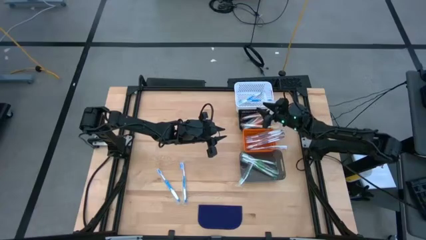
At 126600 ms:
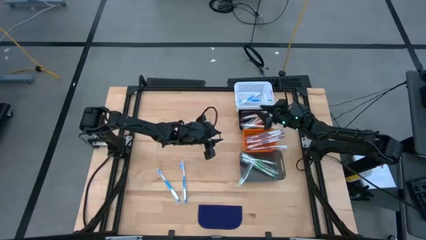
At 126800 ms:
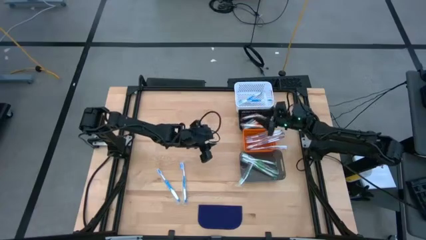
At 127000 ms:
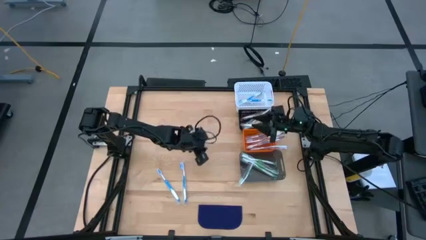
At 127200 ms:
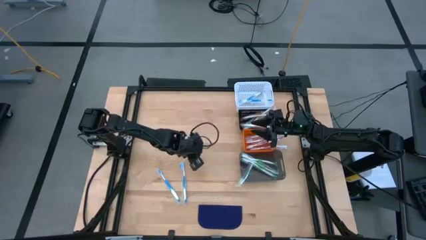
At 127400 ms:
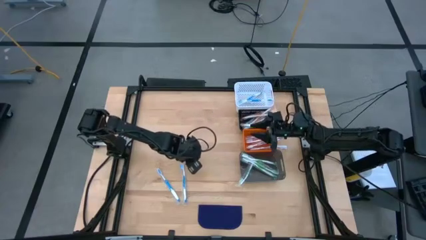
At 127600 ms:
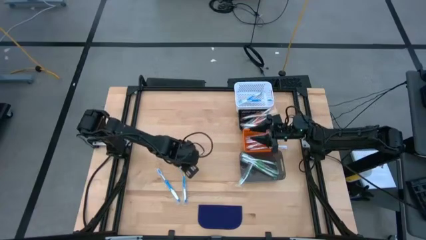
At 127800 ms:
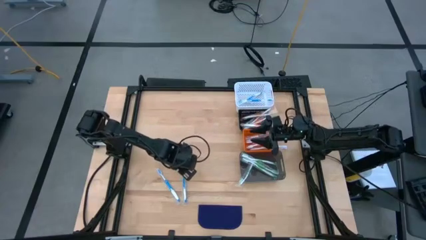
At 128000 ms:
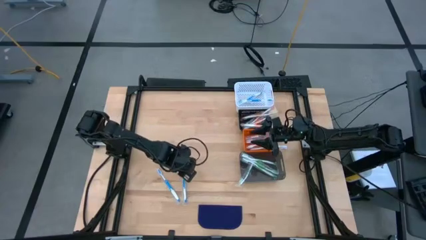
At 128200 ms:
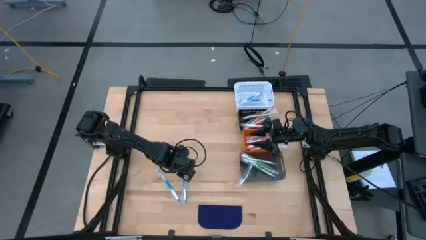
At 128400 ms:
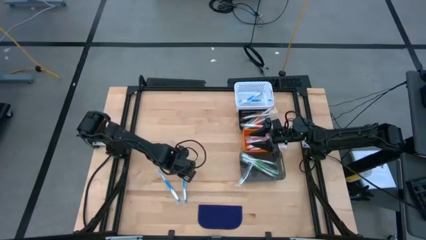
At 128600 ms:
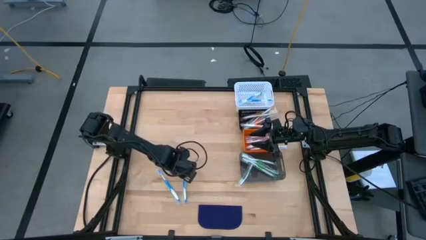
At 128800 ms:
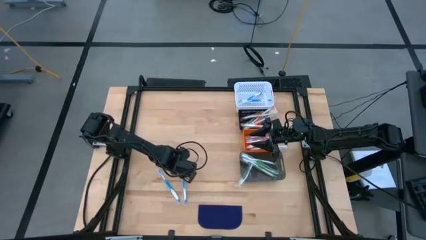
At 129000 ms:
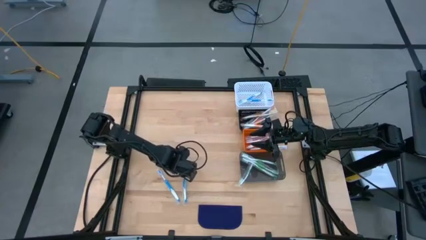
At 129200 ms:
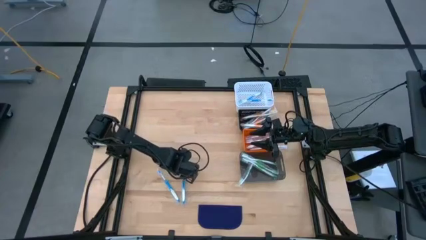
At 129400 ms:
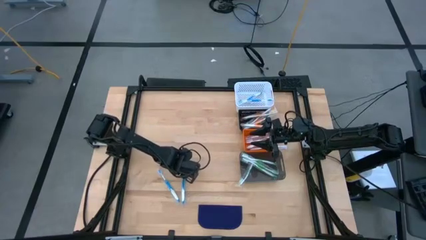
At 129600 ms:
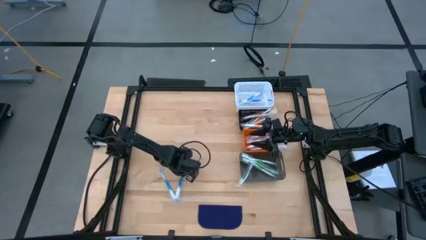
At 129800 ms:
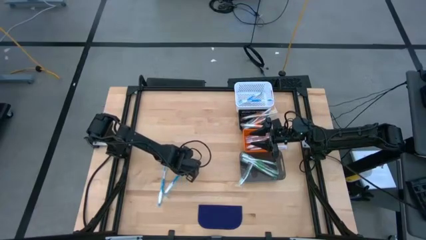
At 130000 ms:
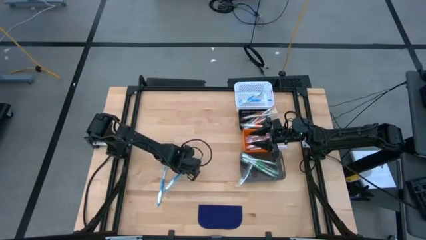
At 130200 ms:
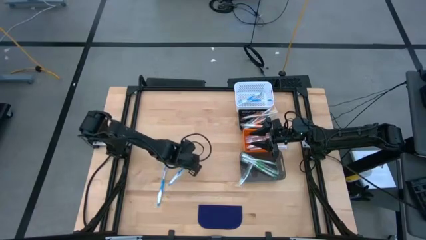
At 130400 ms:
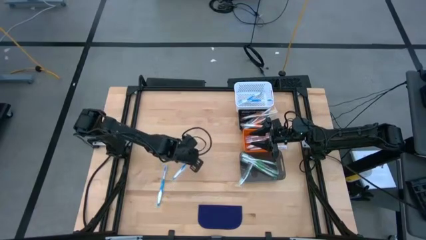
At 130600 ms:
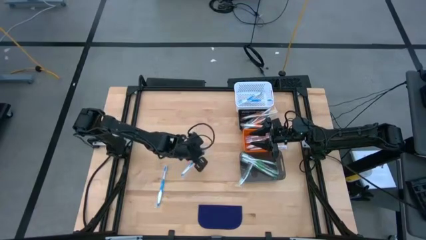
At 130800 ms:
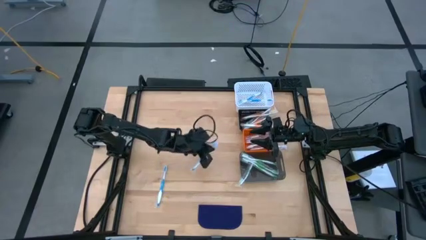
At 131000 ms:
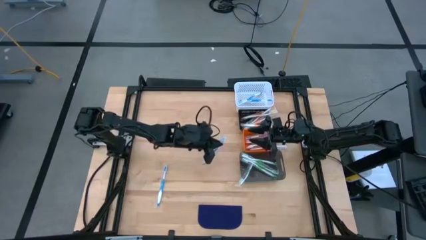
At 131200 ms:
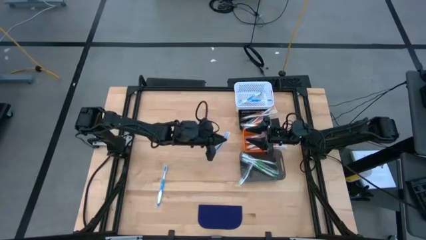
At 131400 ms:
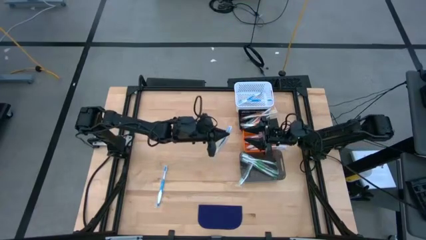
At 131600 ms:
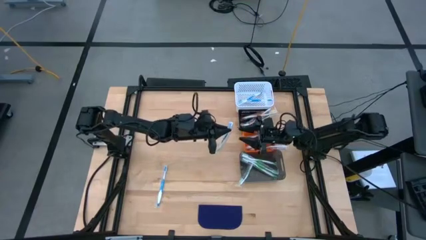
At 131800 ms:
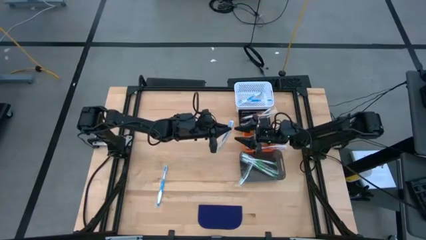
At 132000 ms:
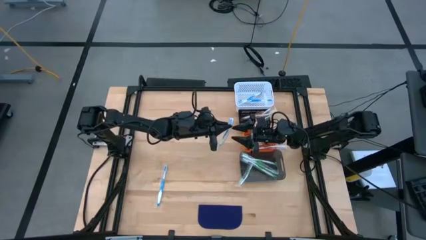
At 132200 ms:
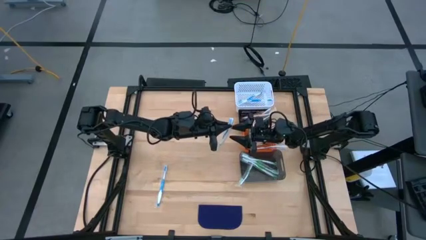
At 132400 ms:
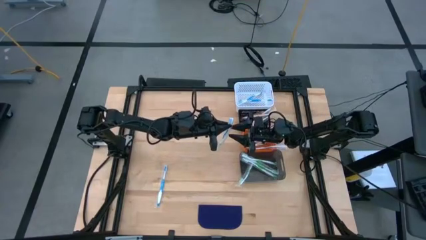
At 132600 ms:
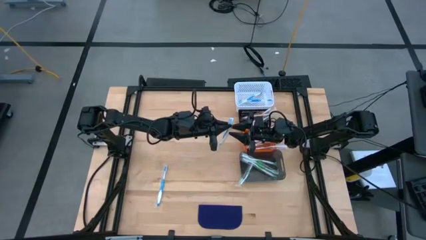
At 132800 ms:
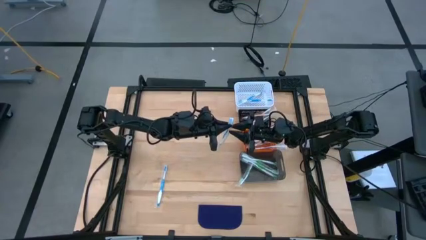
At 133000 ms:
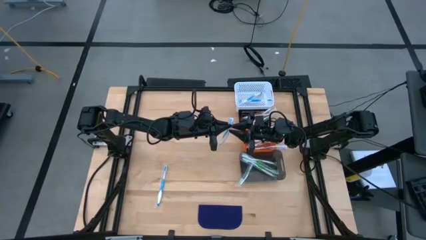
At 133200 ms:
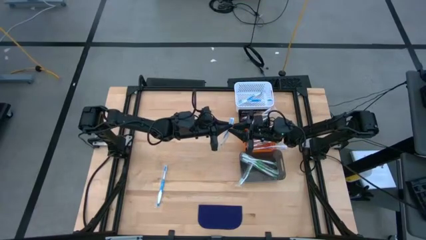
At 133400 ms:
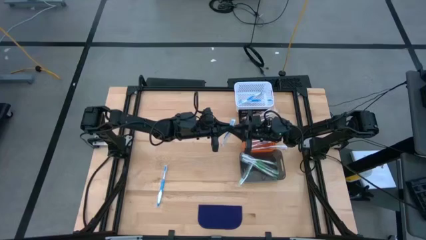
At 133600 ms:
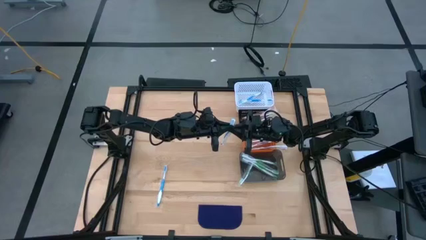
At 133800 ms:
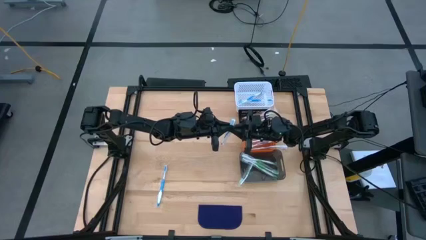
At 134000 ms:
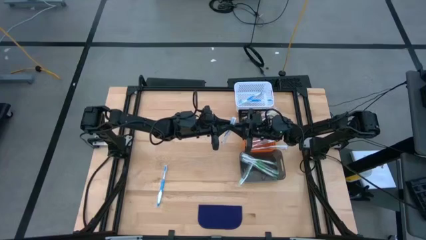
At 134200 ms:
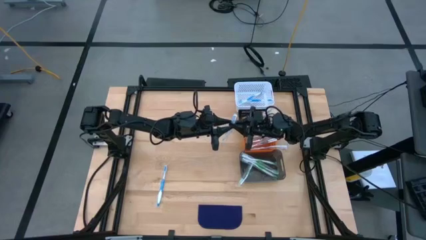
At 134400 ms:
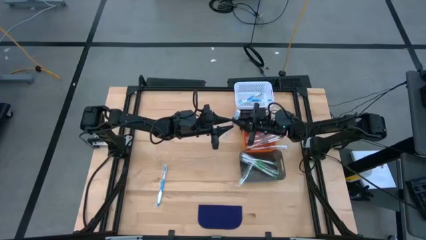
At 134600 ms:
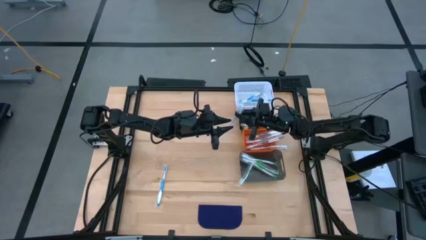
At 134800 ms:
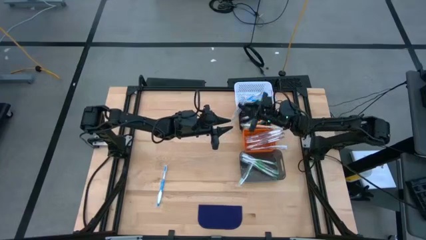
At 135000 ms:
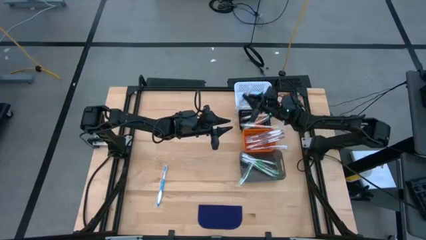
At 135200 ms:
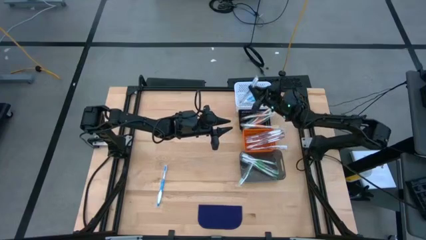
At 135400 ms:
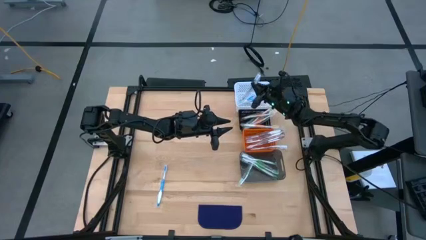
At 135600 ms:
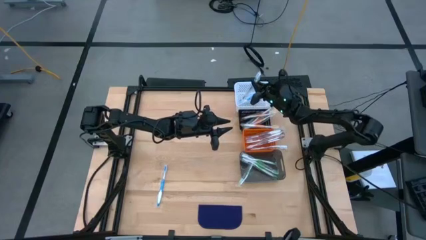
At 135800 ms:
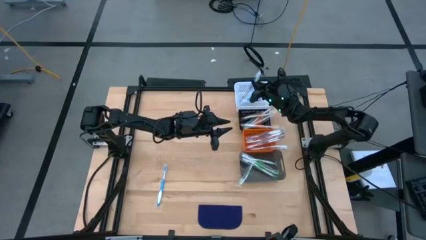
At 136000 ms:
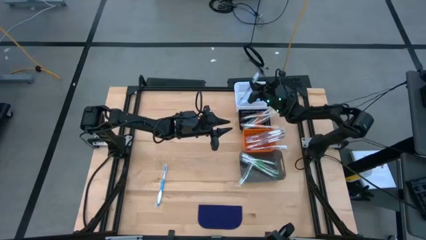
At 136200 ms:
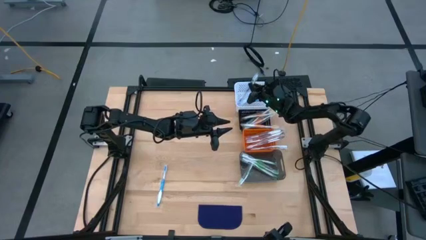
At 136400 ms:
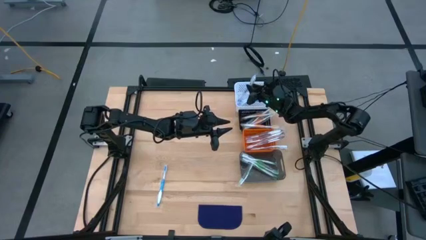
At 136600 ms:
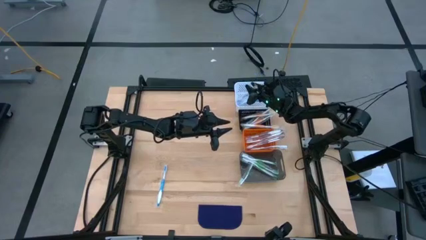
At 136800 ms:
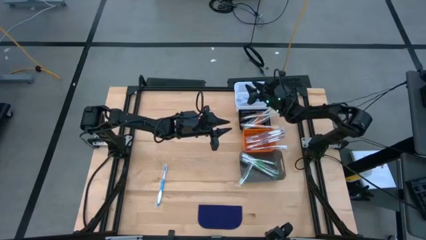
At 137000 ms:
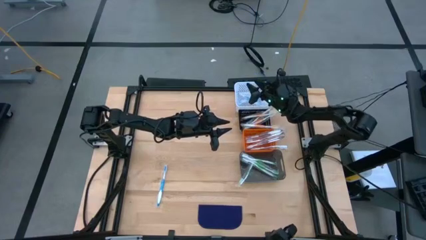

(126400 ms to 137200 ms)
Task: Pick & Place Toothbrushes
Put the blue toothbrush into the white bin

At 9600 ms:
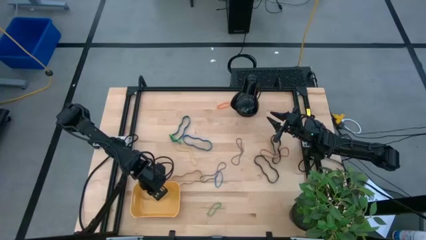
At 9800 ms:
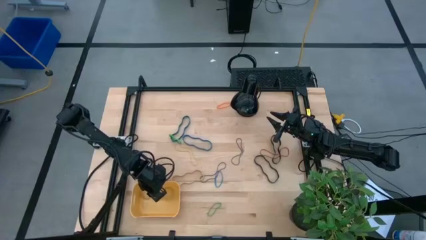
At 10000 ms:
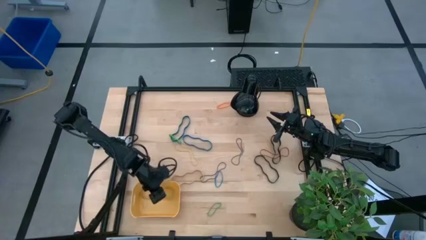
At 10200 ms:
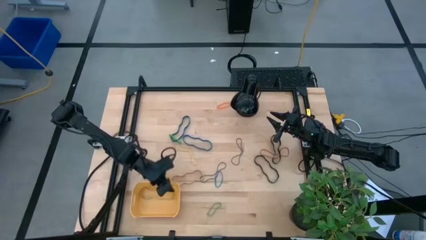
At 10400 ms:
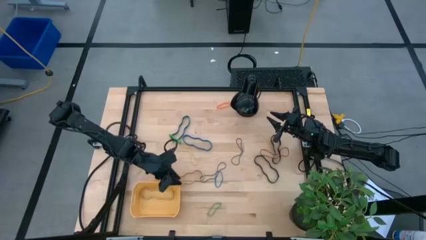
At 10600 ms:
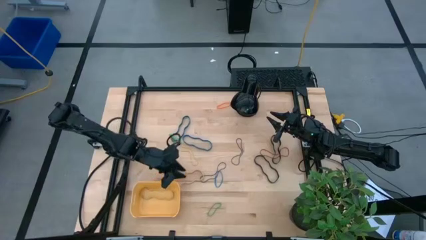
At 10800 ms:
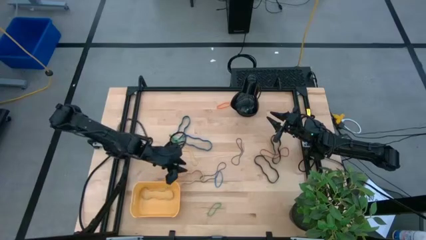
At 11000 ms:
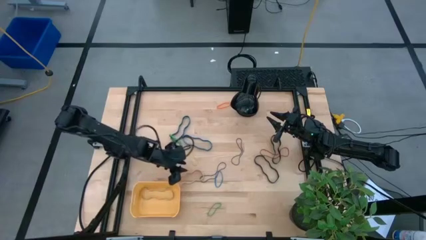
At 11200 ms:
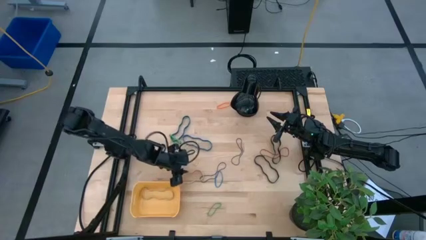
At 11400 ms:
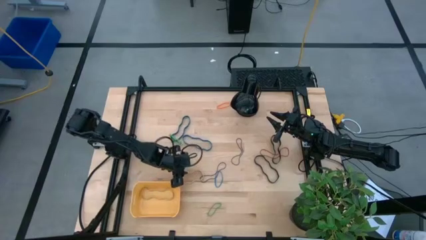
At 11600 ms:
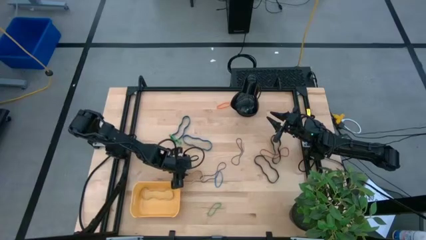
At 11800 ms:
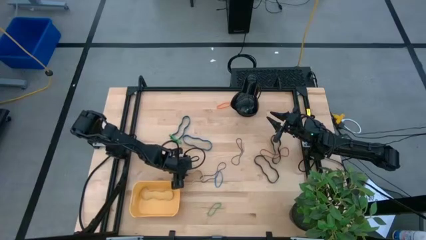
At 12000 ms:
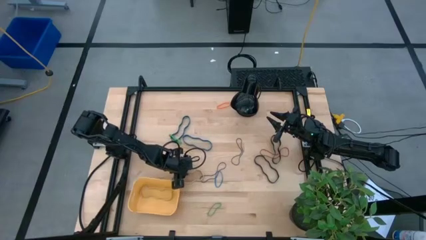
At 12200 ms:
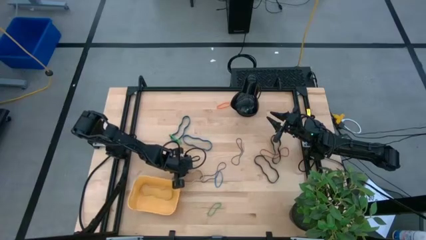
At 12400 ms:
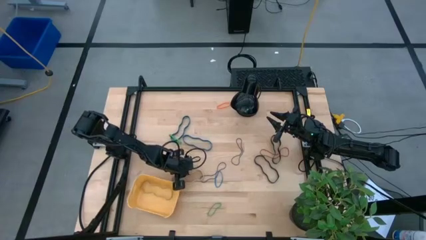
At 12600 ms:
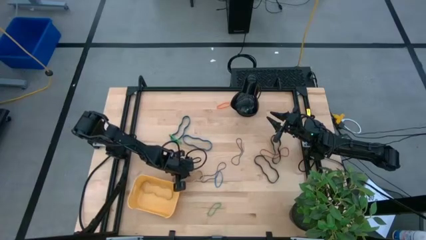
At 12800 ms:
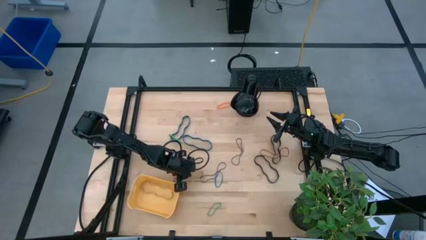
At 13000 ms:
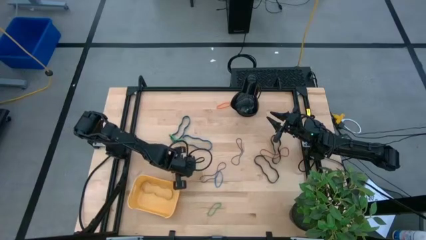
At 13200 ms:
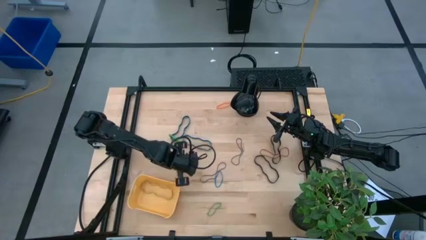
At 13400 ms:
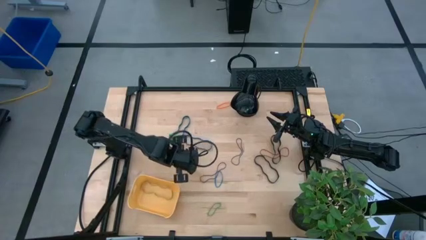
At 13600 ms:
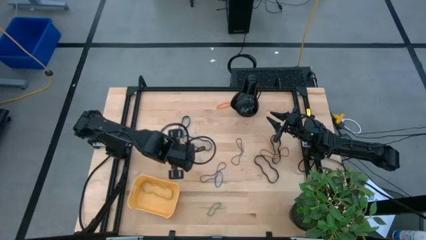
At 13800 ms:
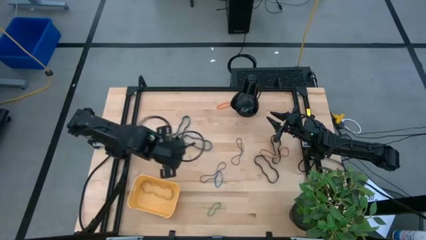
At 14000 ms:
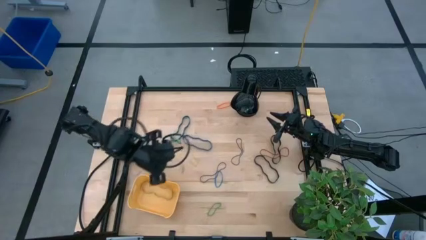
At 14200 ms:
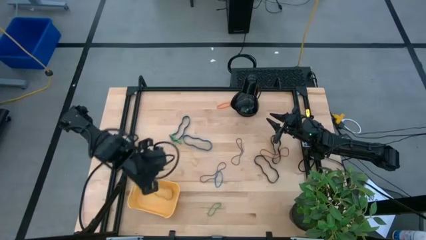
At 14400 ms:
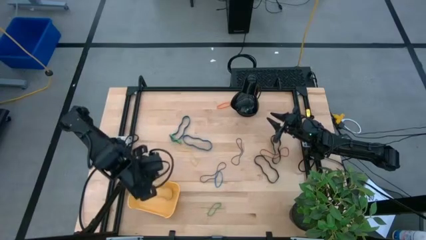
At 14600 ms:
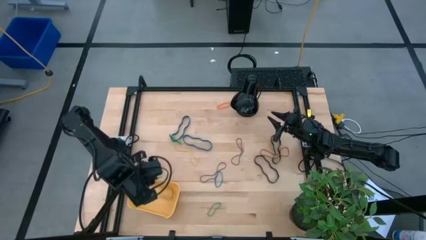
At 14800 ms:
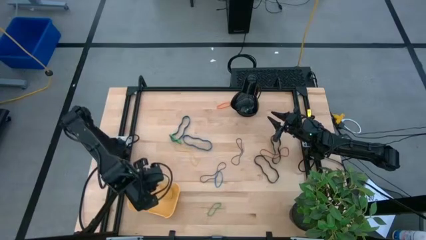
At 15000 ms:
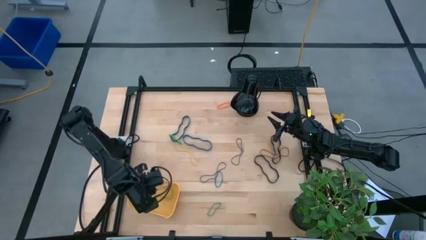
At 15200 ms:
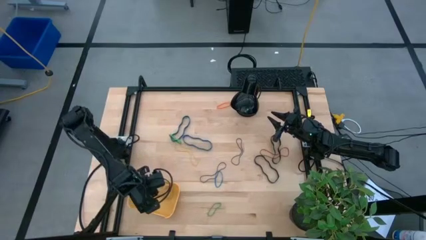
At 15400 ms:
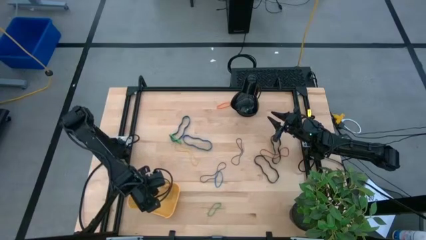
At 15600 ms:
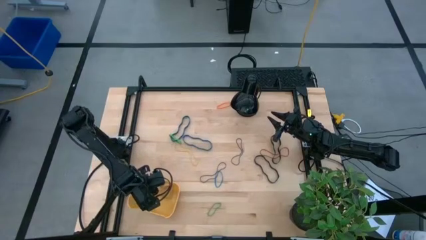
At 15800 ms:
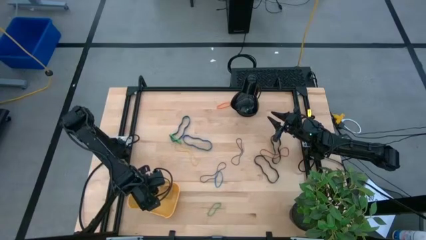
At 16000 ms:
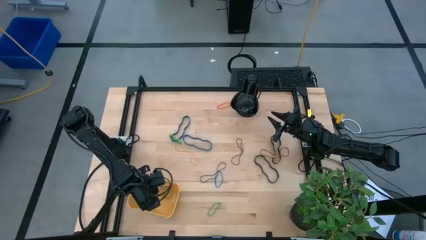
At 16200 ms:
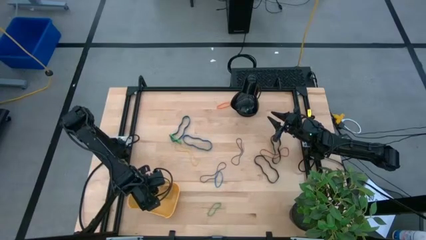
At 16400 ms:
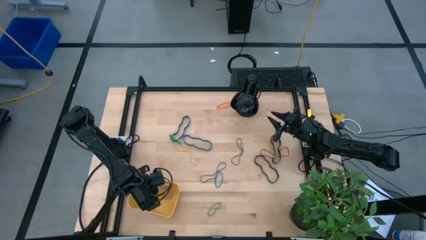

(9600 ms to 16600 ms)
Task: Pick and place rubber bands into bin
Put the light brown rubberband into the yellow bin
